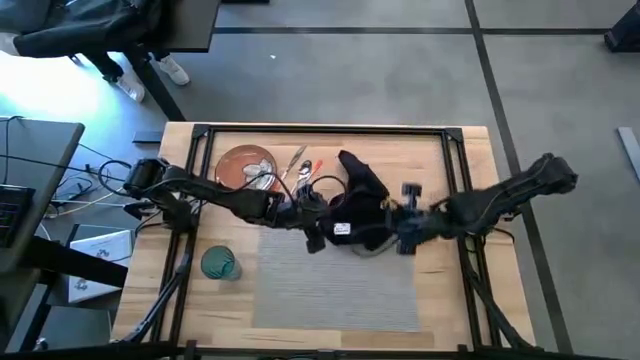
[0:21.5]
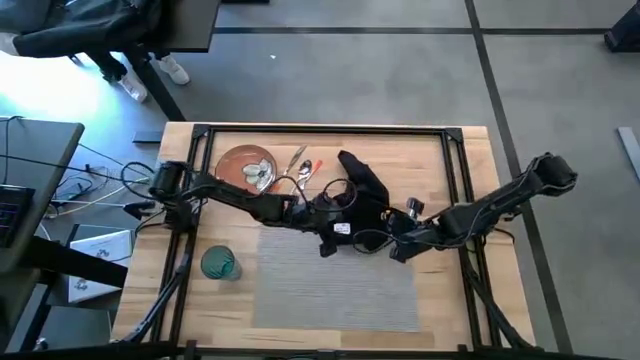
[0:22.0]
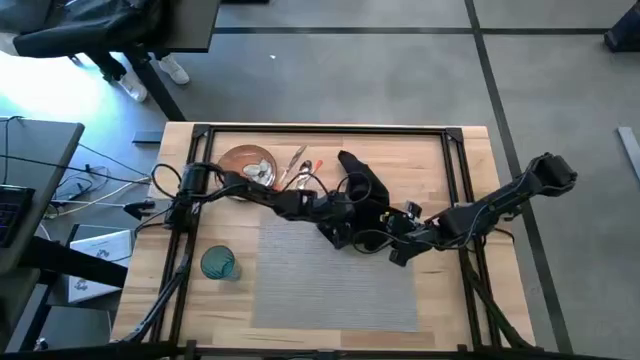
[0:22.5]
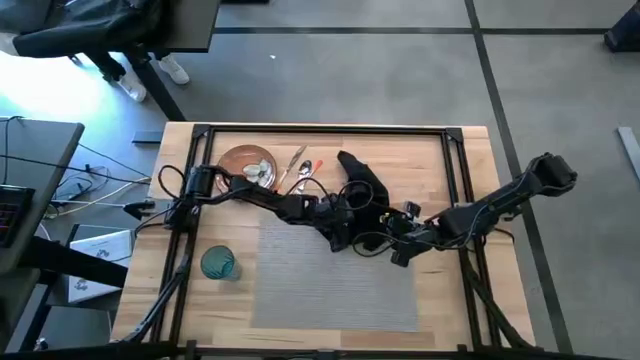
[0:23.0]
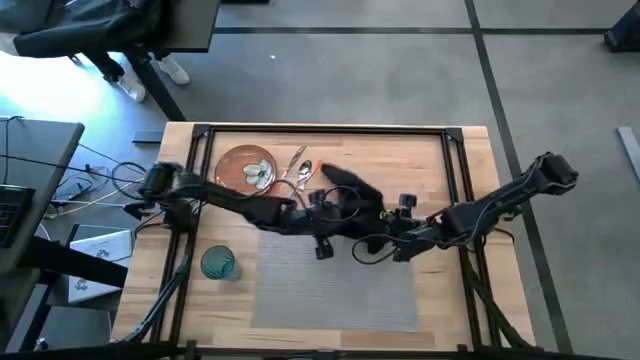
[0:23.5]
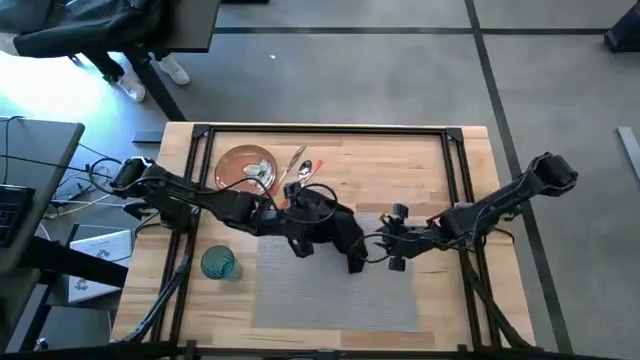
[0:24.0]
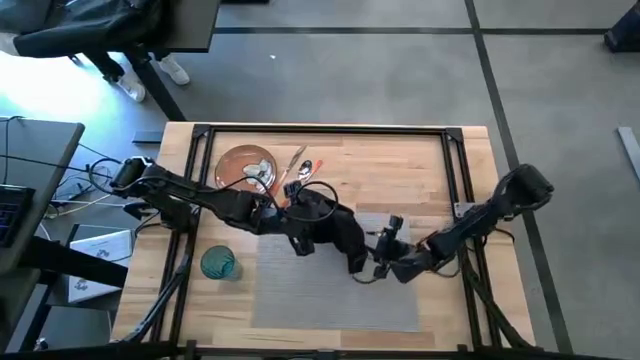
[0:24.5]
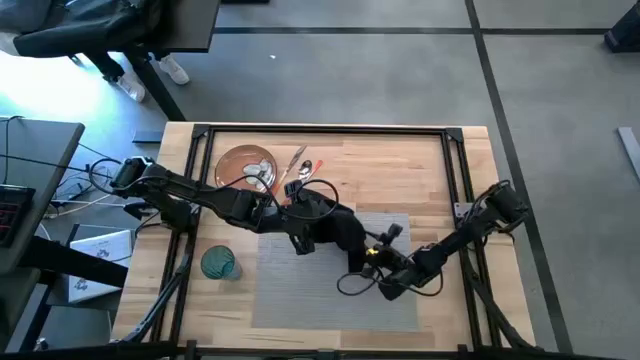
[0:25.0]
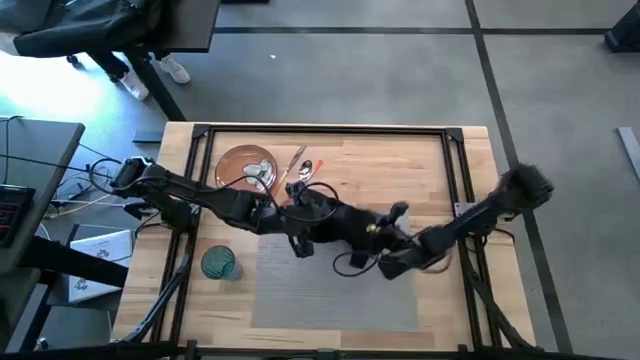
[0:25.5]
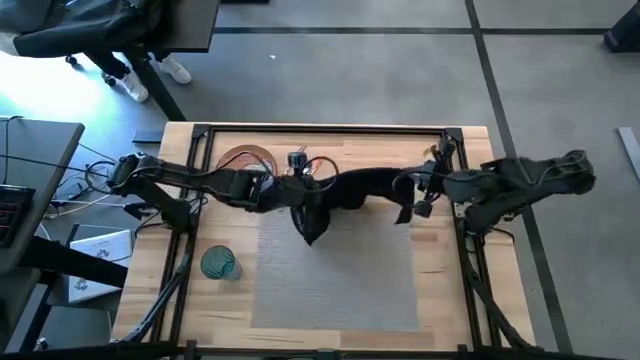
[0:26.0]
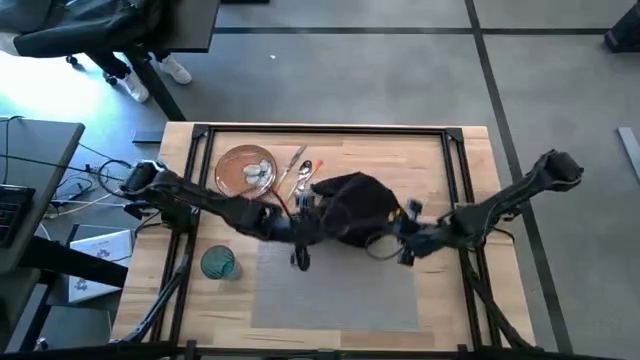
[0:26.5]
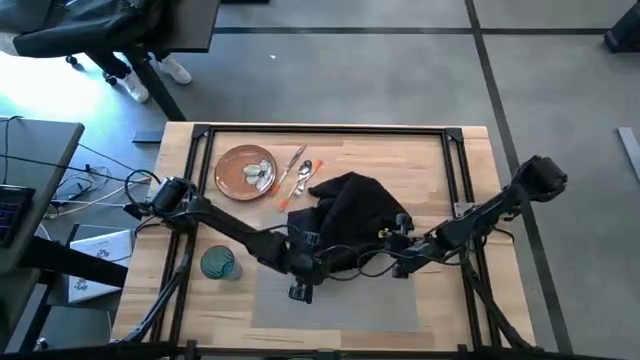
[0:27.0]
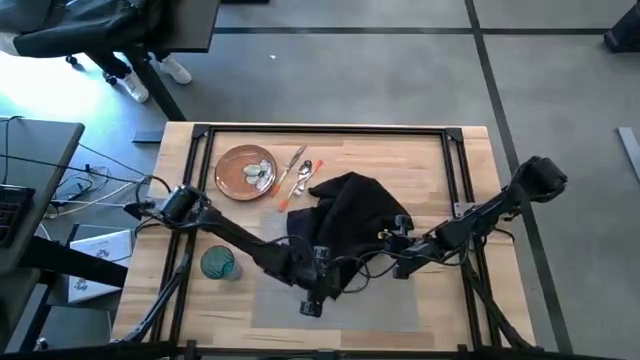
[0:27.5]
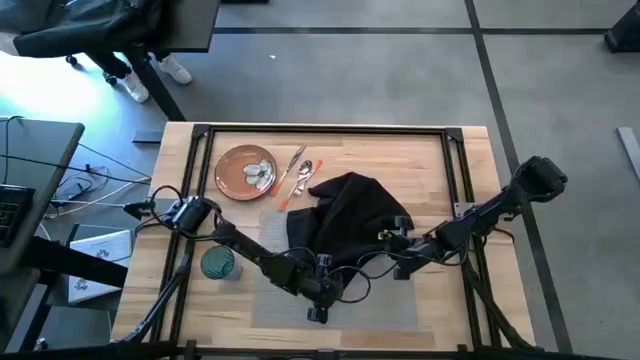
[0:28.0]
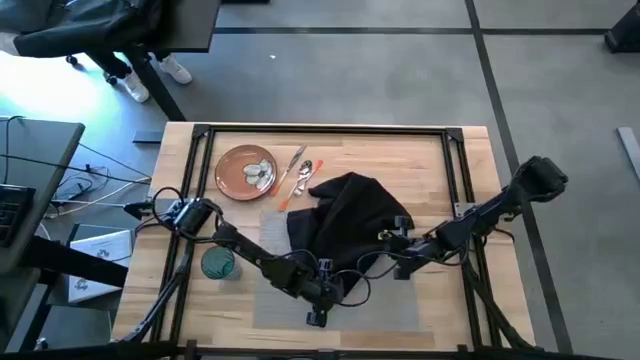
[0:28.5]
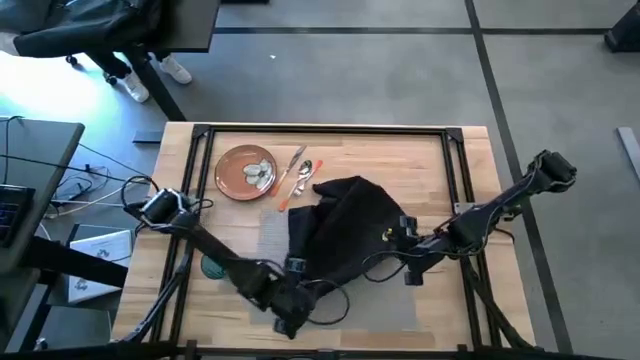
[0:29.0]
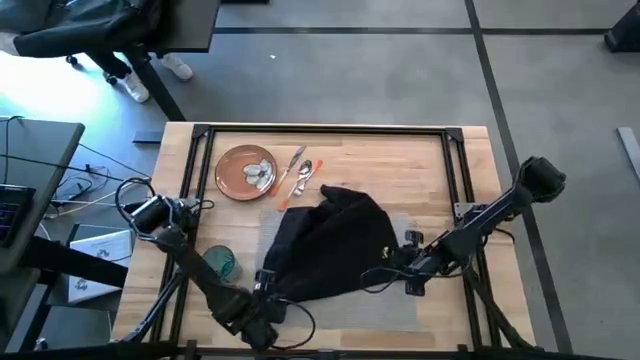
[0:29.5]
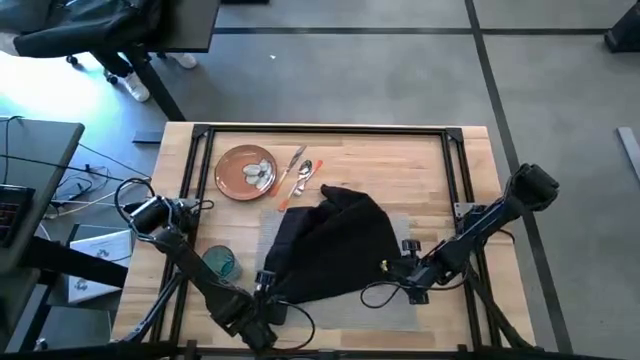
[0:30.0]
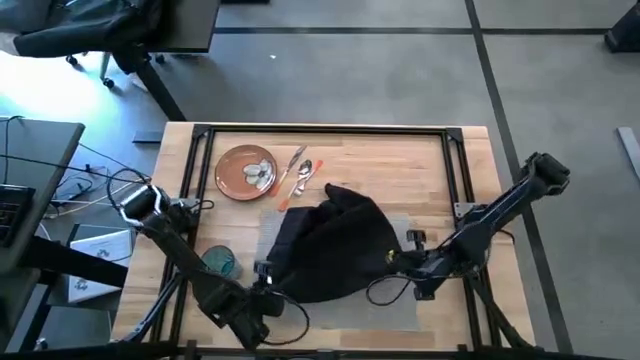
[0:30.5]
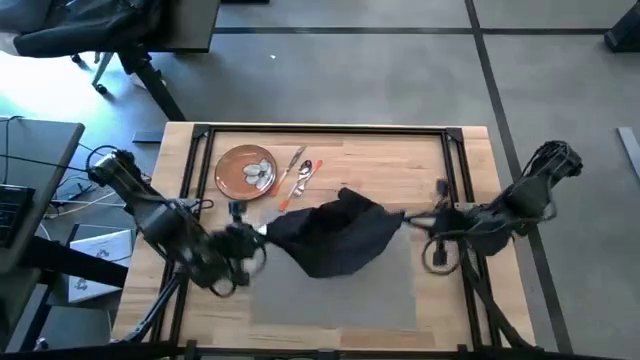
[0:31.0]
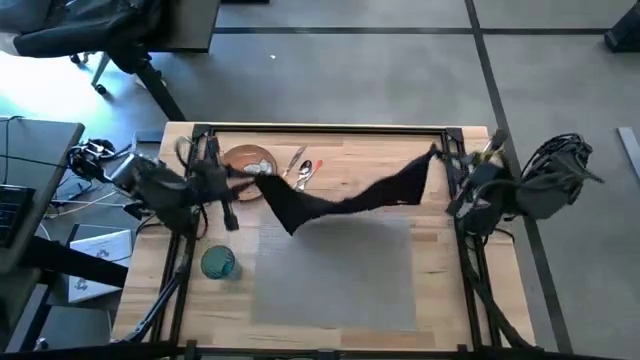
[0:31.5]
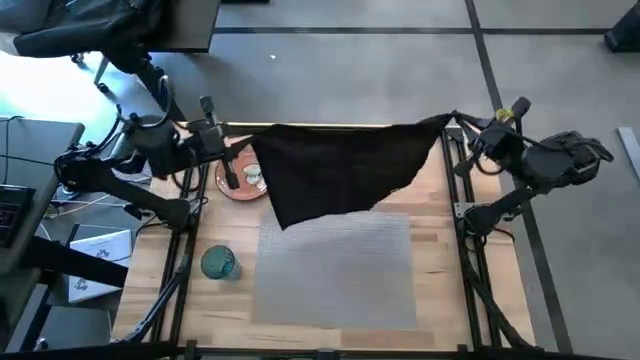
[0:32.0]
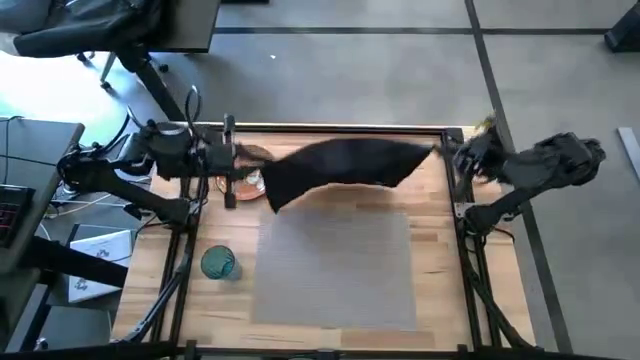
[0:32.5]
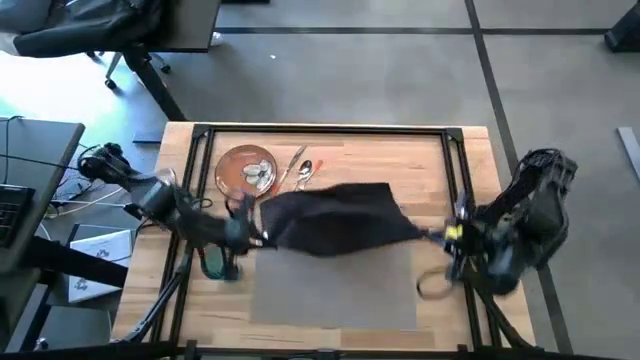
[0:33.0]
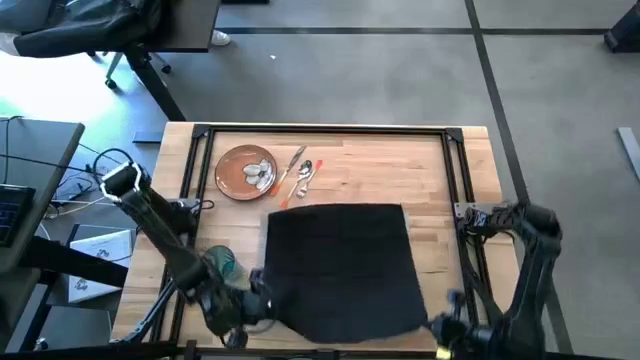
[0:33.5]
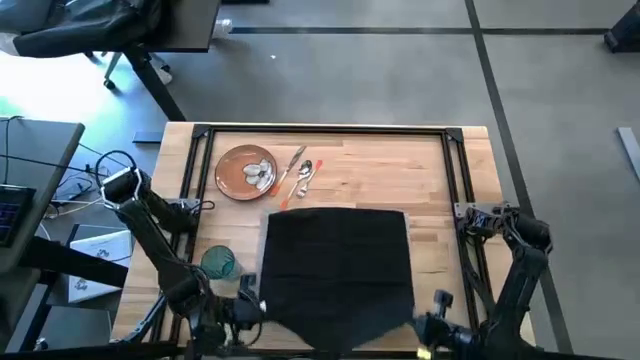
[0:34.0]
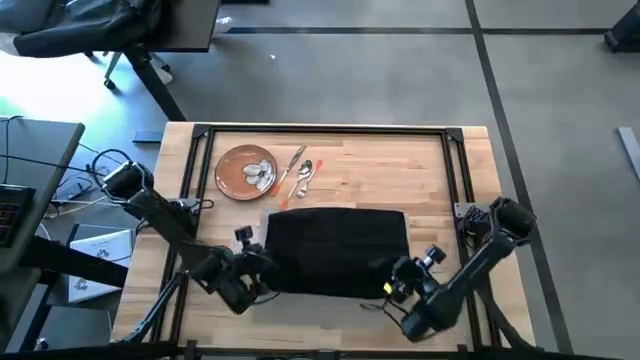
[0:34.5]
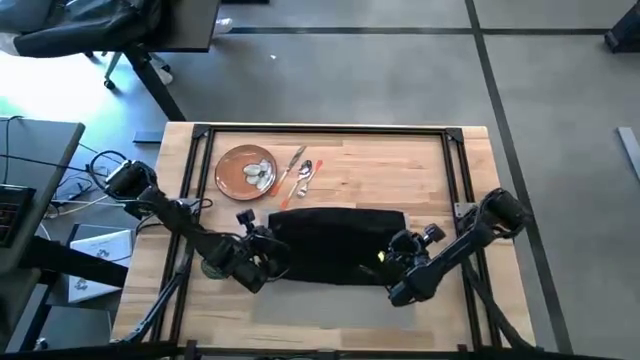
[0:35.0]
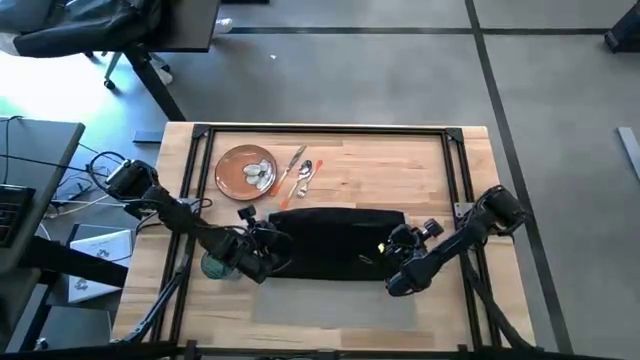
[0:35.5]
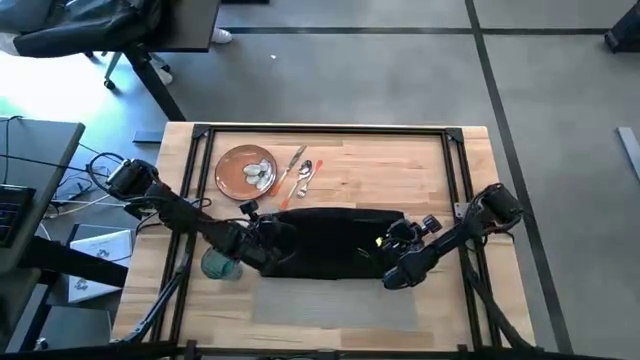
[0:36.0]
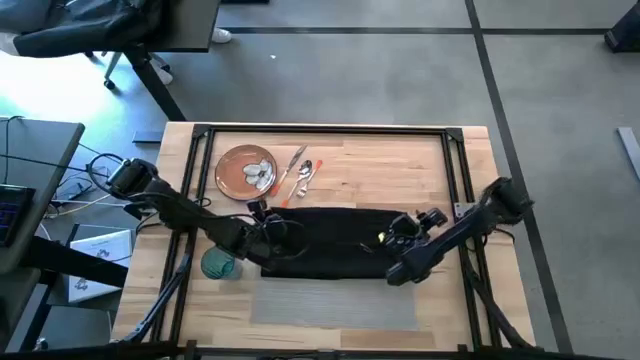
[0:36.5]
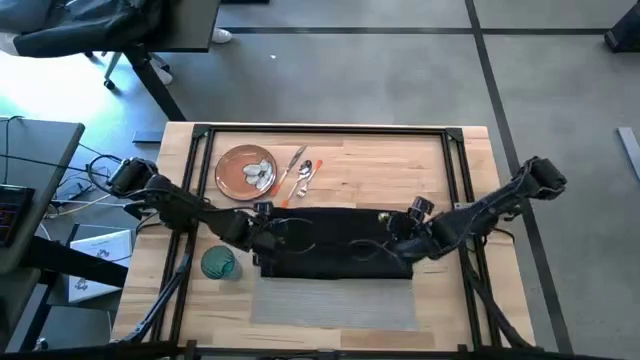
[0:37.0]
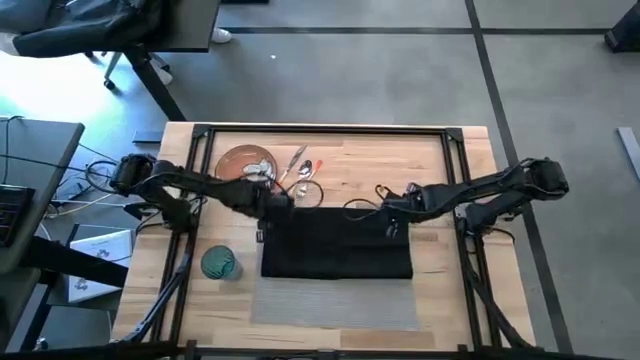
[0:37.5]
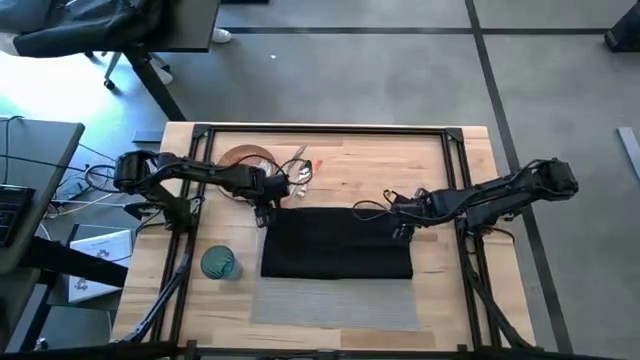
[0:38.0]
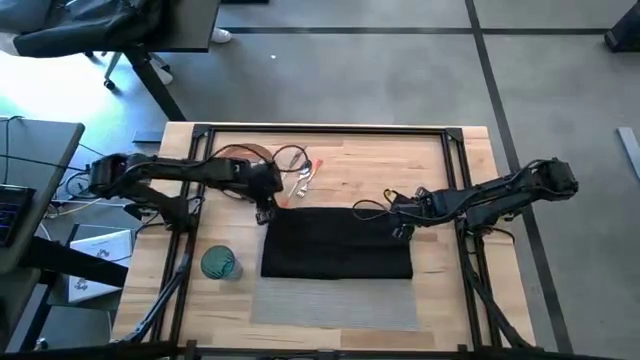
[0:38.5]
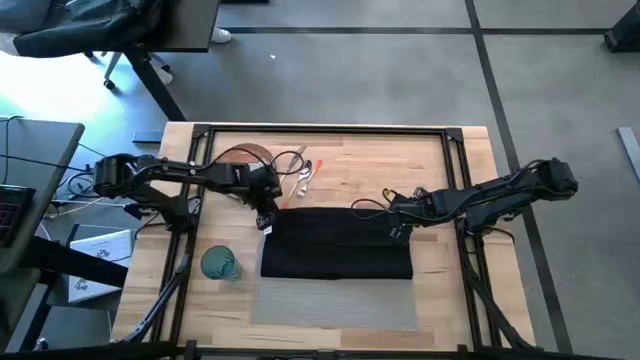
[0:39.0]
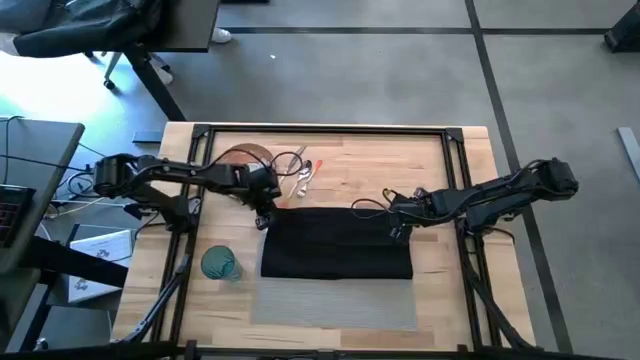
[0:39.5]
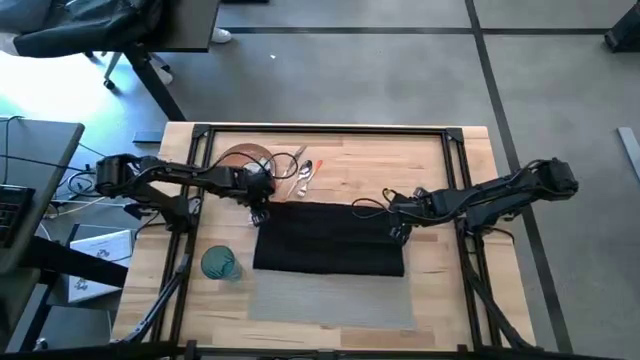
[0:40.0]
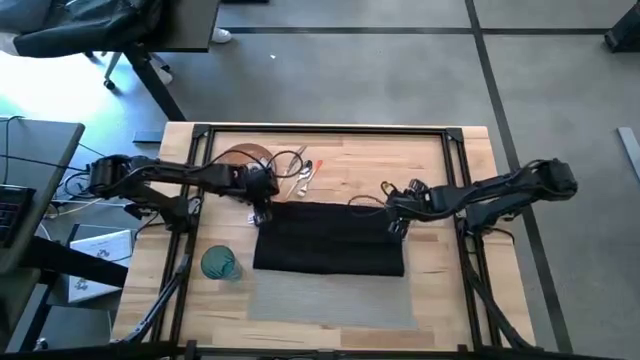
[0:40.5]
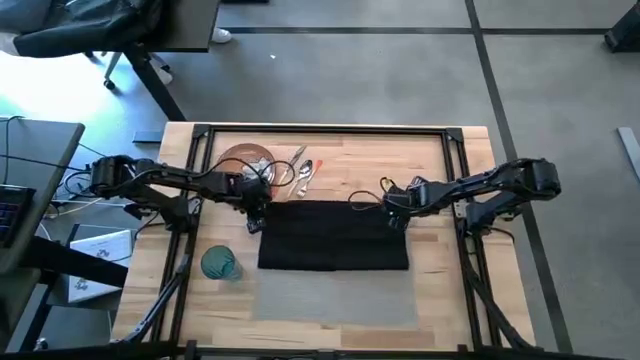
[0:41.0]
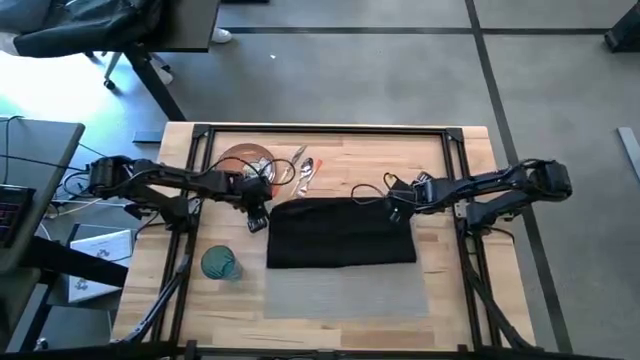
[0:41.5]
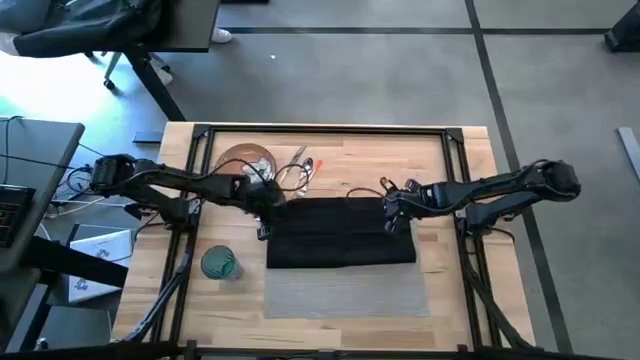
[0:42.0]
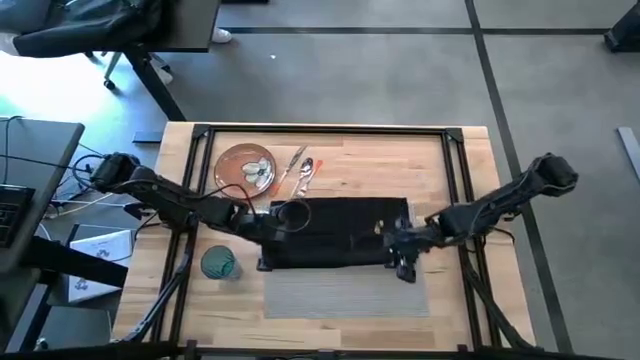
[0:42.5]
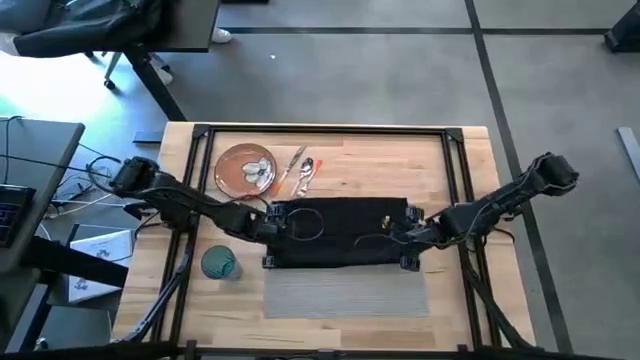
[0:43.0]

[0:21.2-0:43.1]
Task: Set table place
Fold the black napkin
